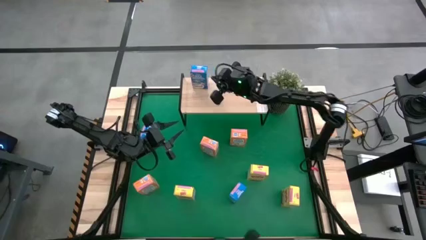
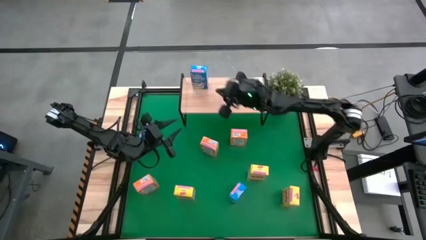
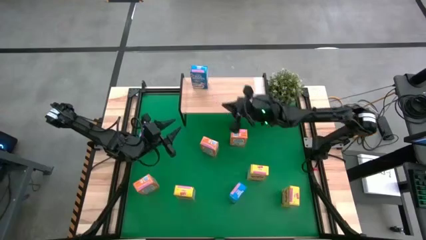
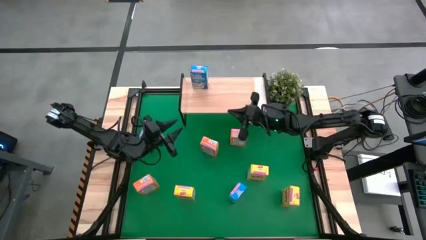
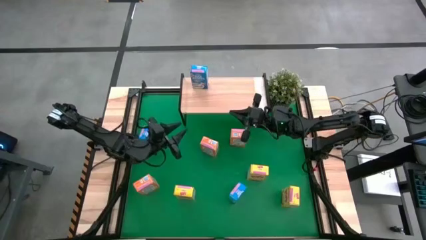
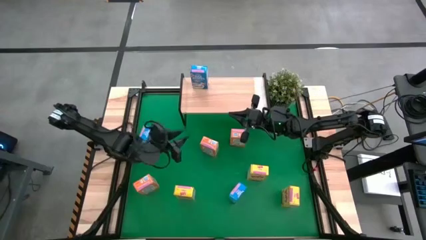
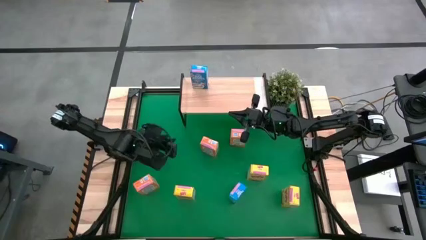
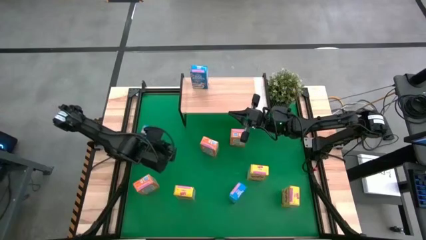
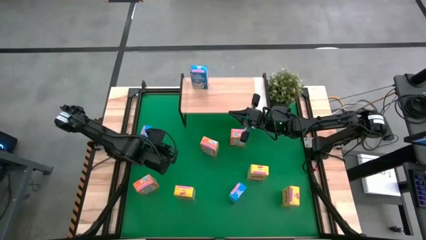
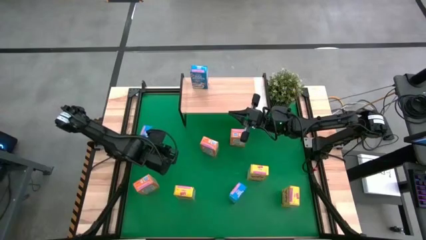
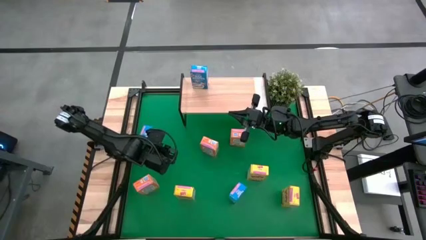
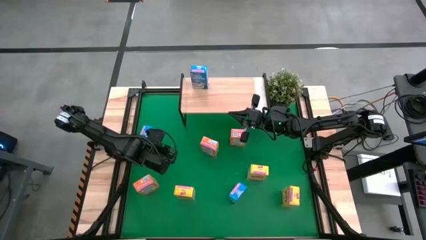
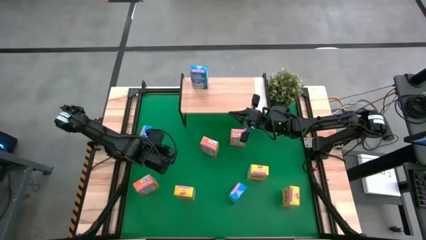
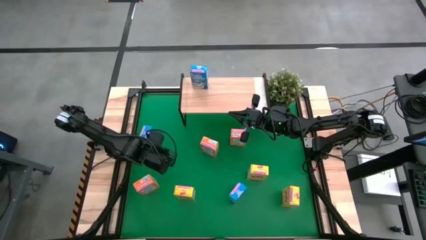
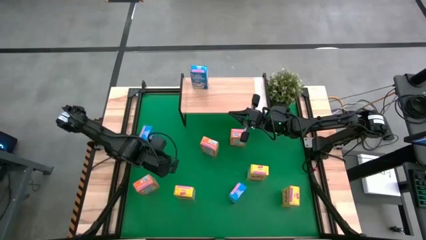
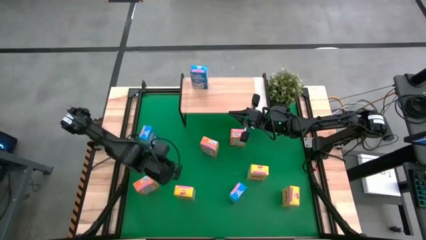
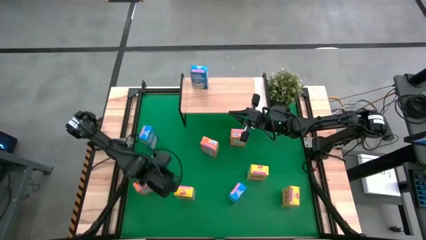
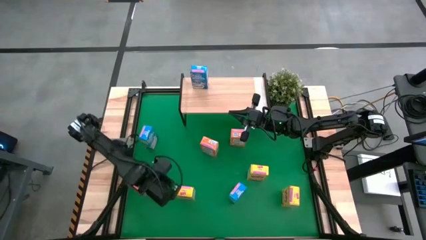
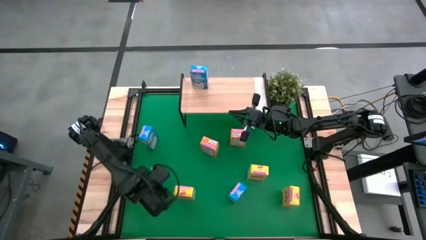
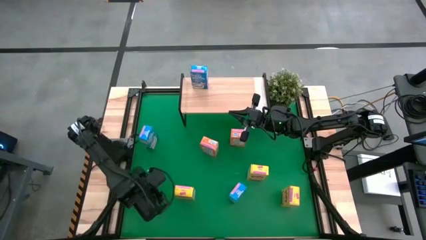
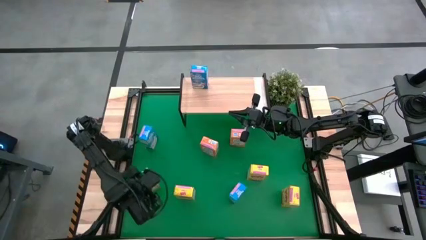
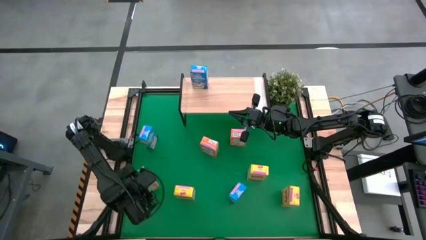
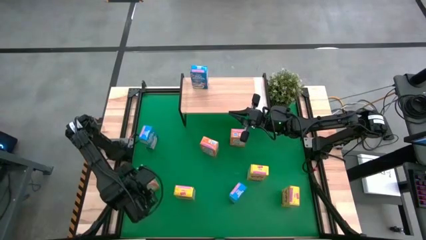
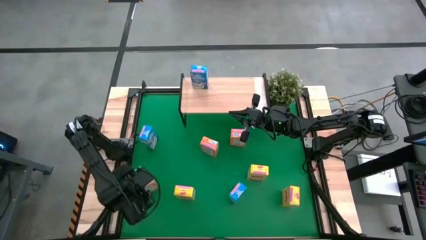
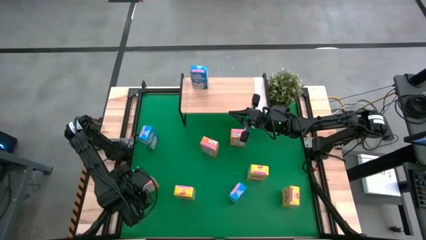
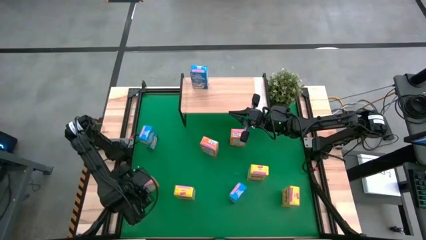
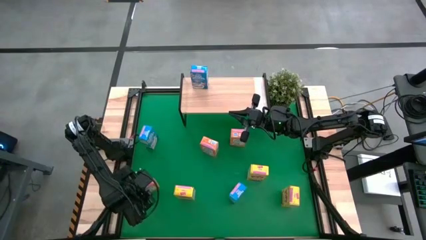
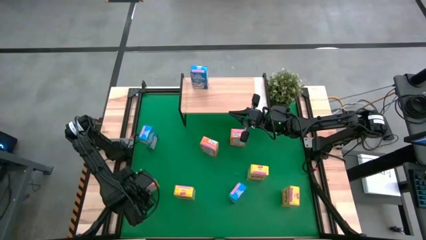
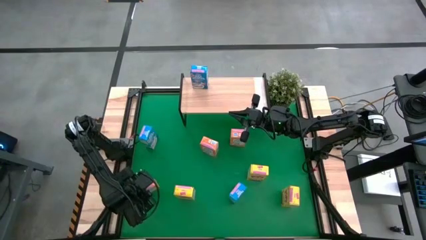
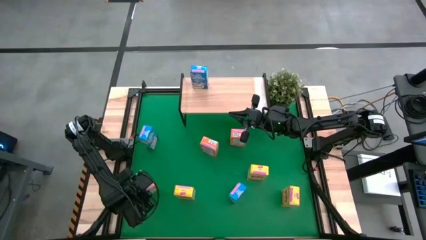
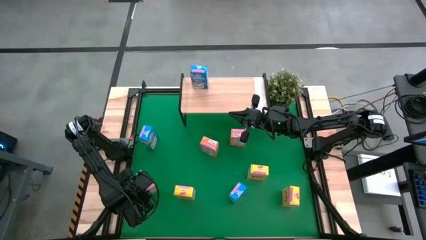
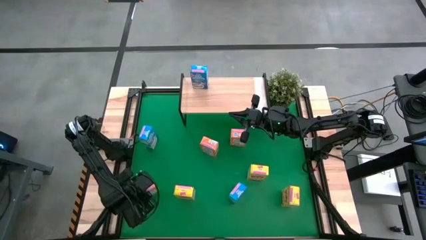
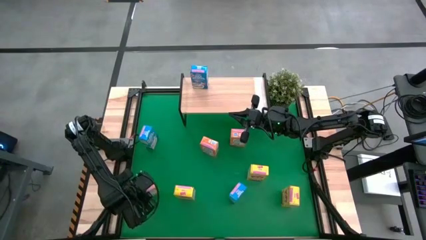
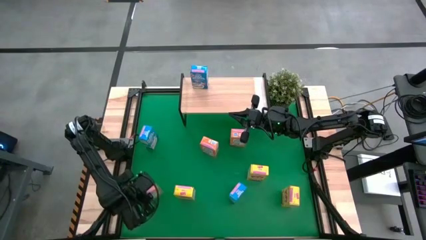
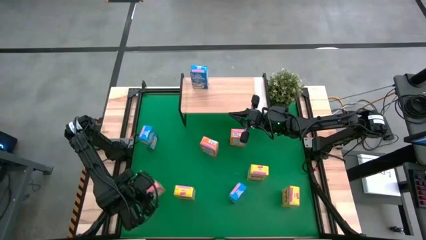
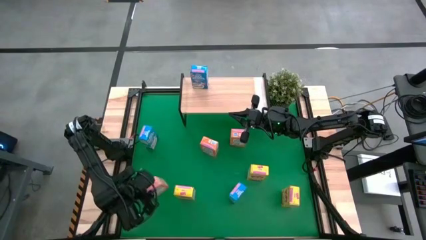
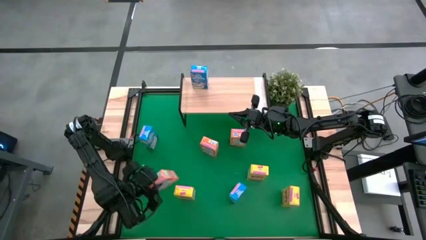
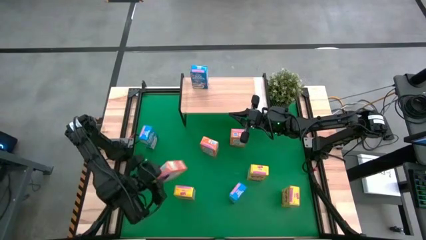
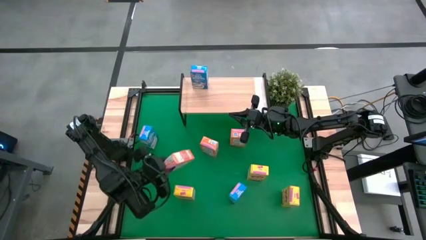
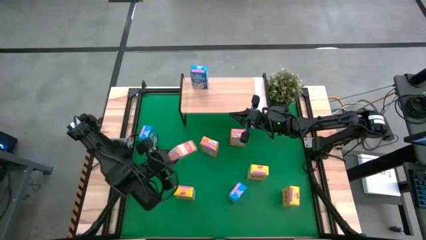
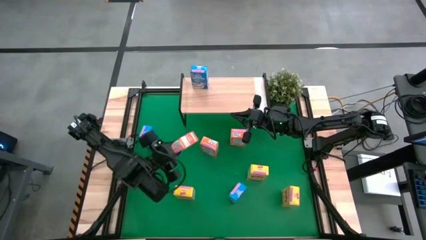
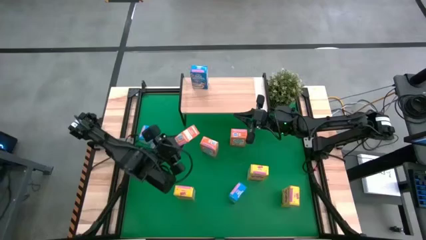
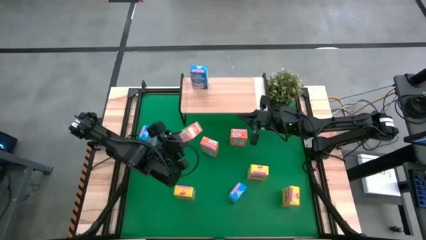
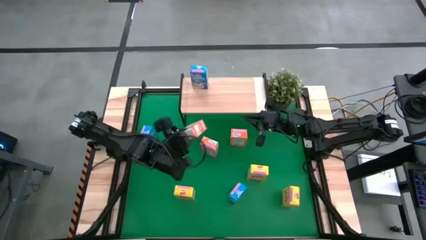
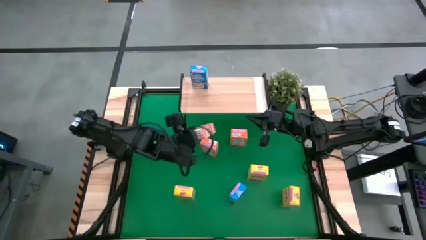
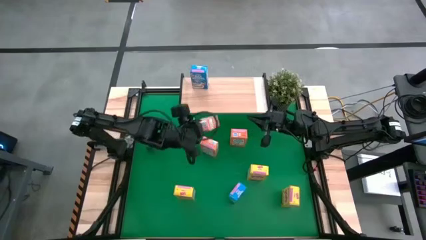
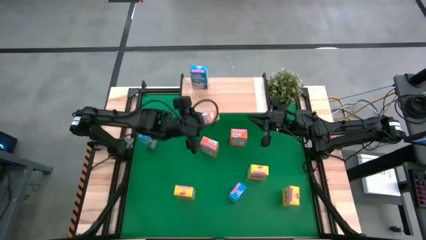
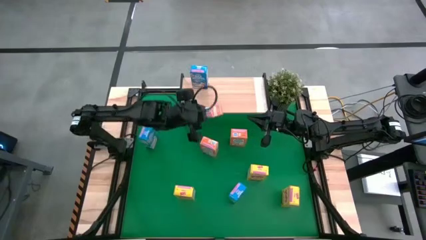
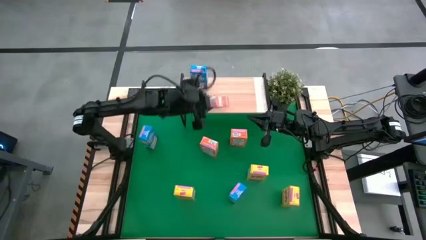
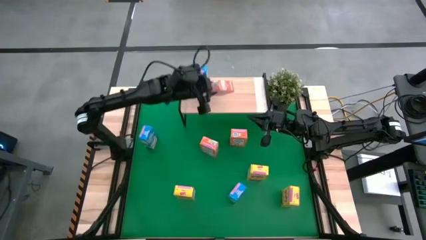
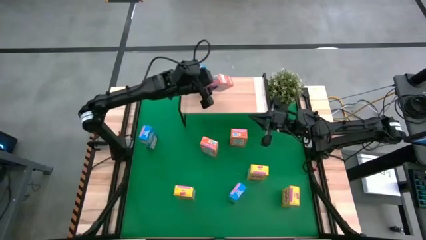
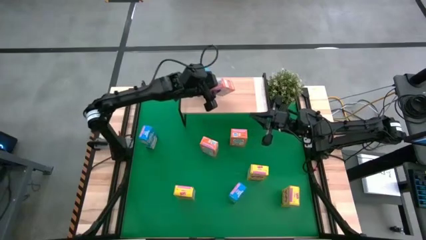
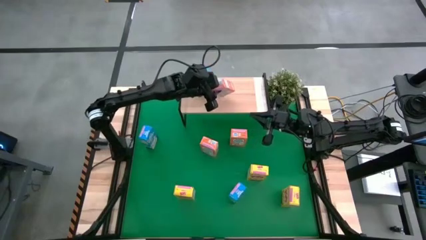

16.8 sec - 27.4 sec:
Task: Stack cereal on shelf
Put the bottom orange cereal box on the shelf

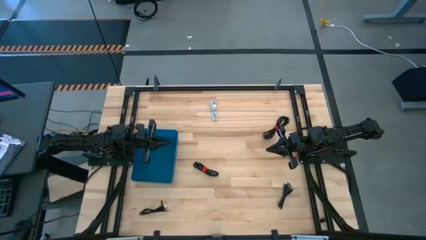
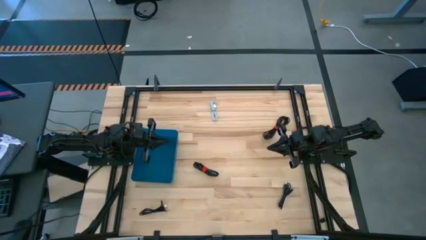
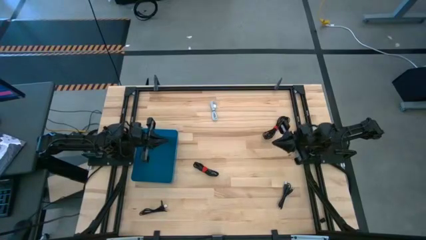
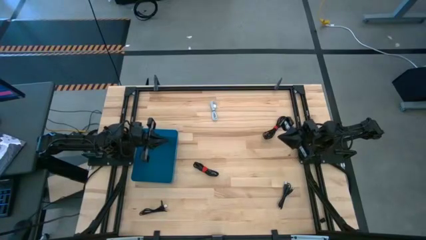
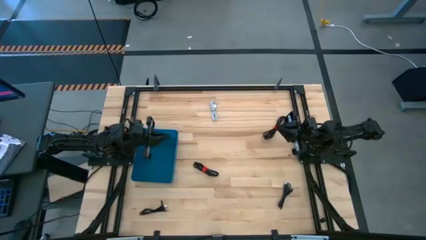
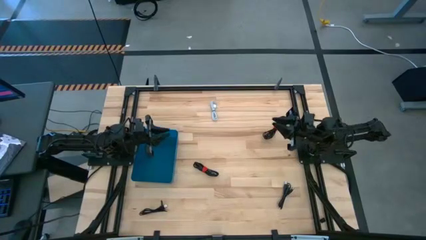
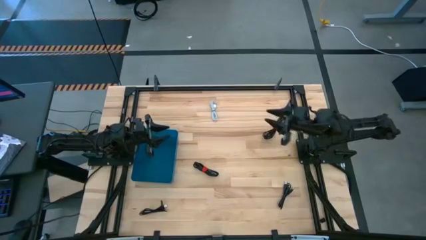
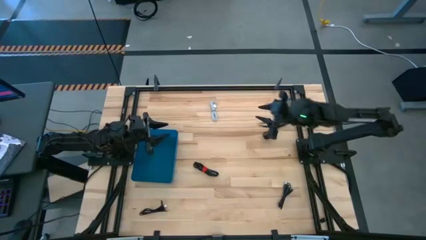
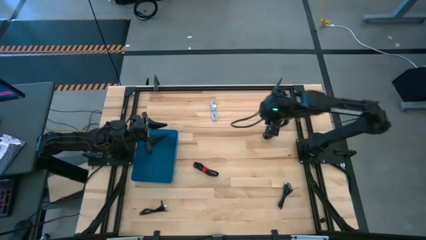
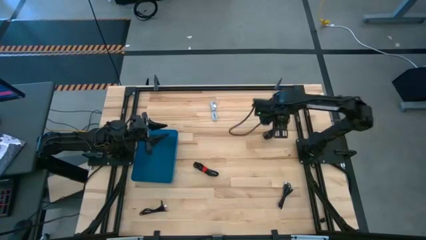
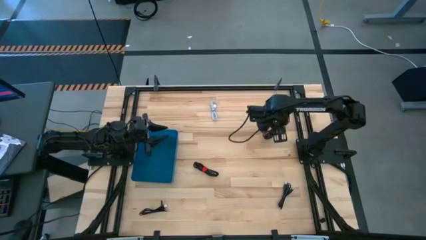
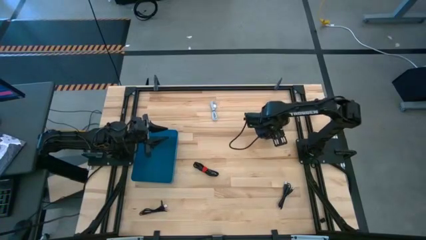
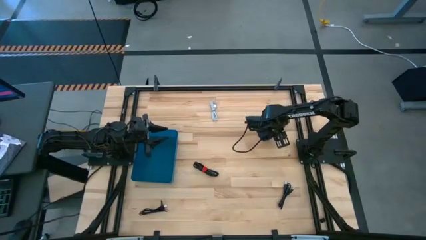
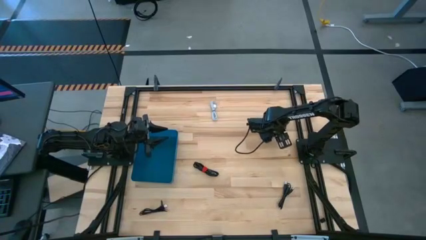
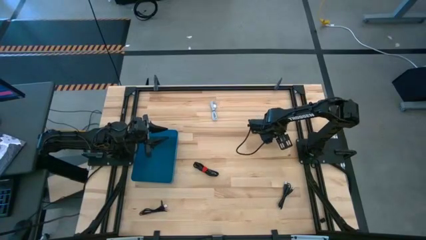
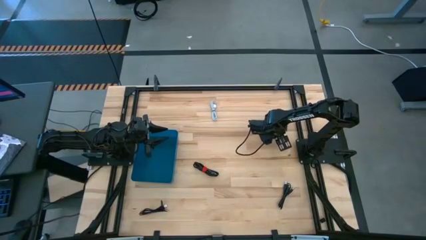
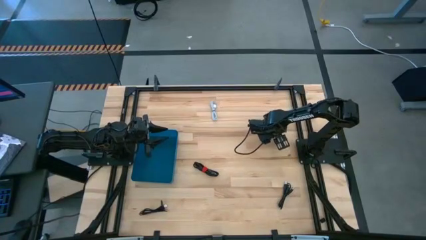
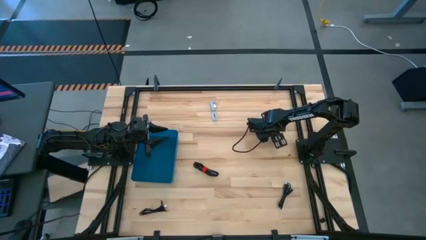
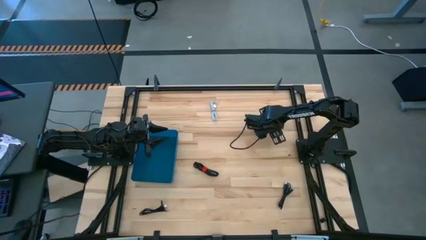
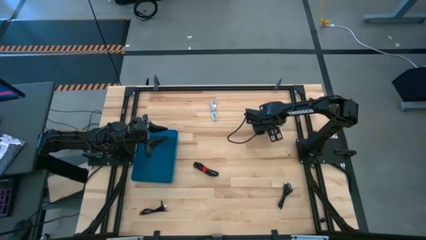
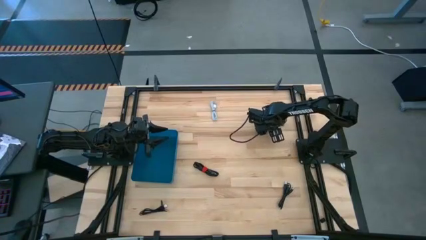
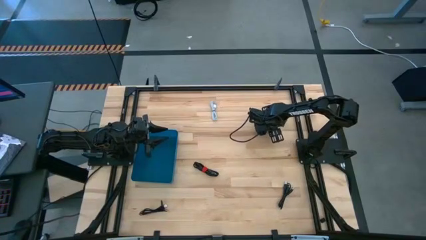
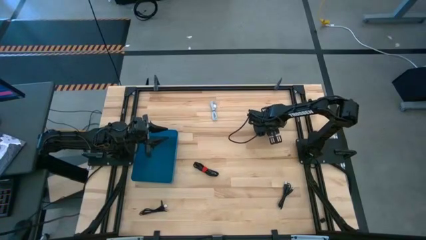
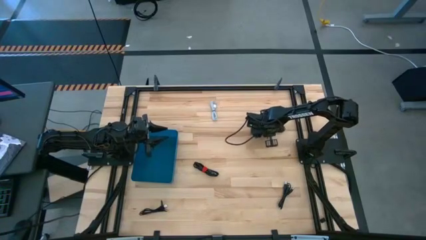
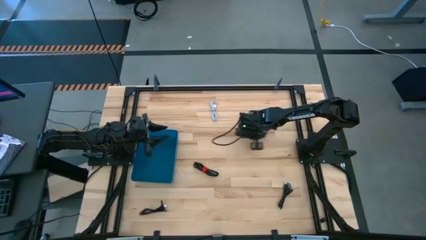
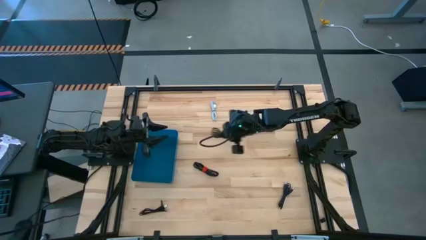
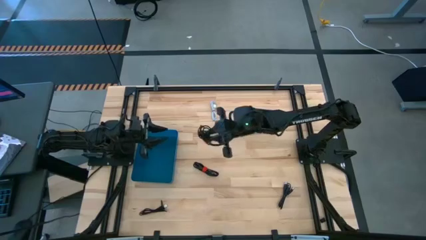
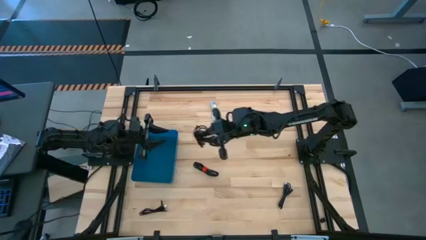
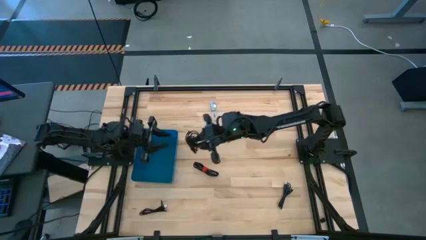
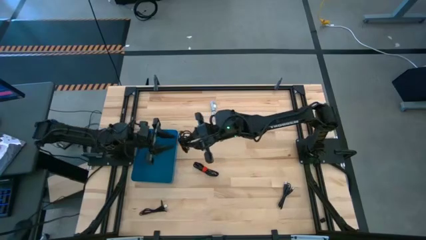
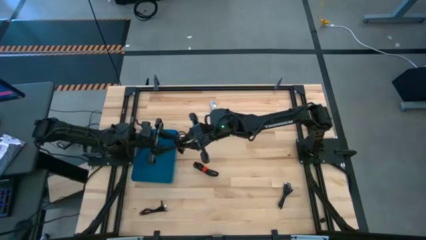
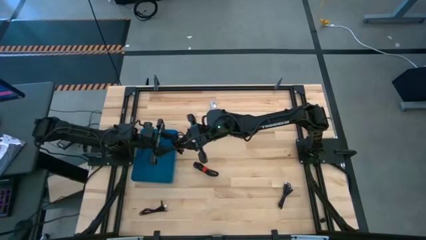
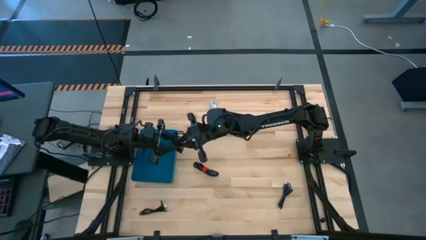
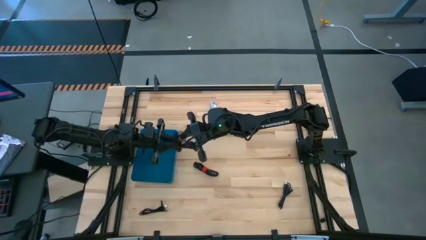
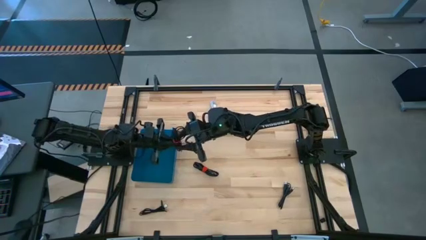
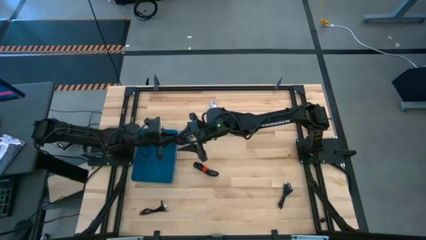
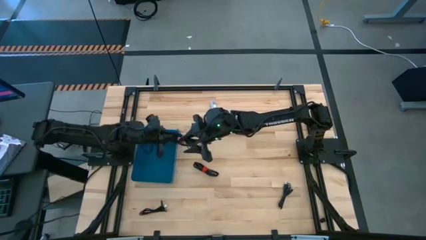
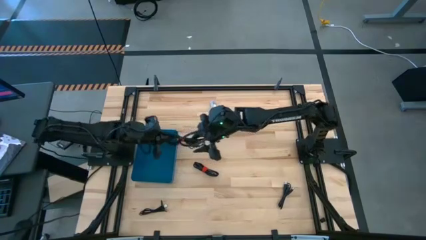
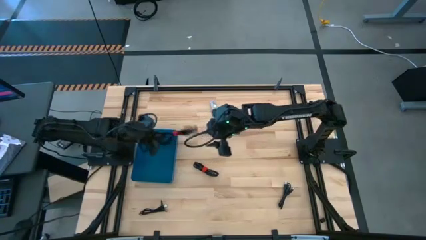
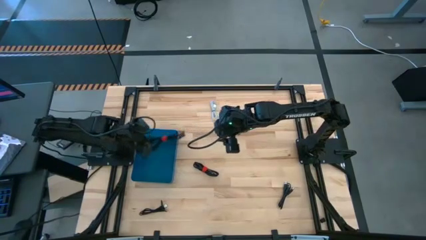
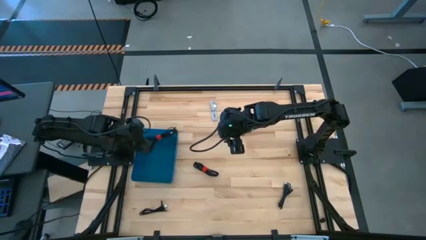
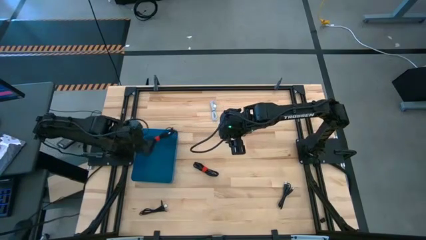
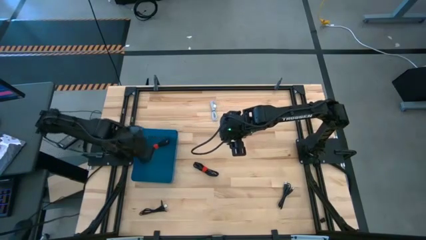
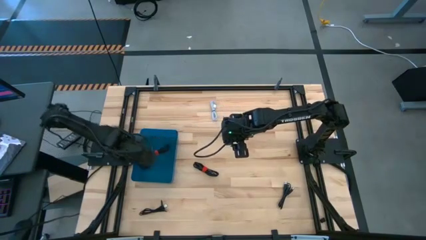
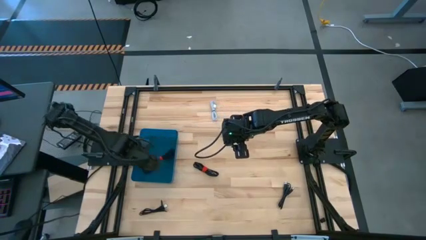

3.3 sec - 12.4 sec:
Task: Pick and place USB-C Cables
Put the black charger cable into the blue bin
